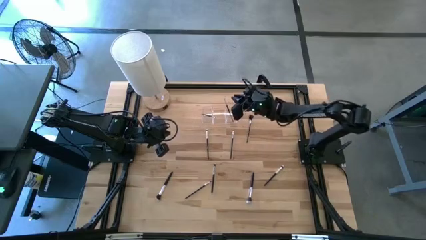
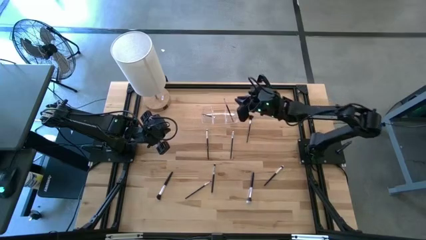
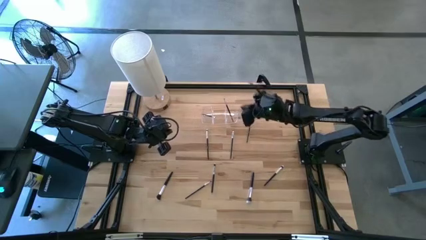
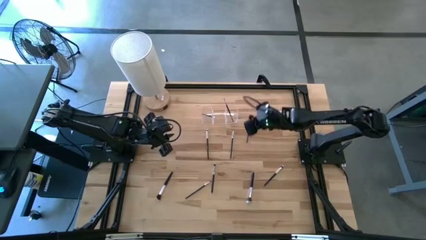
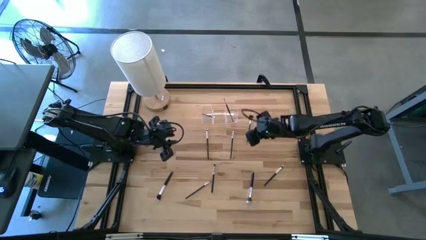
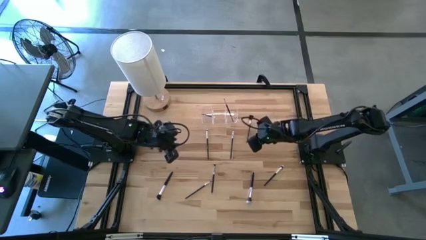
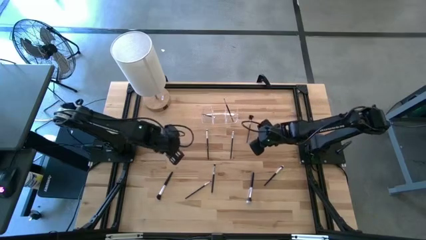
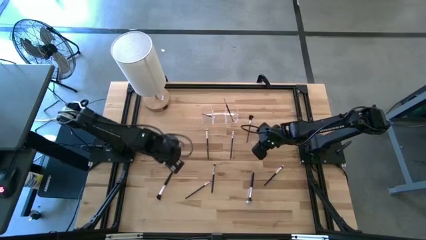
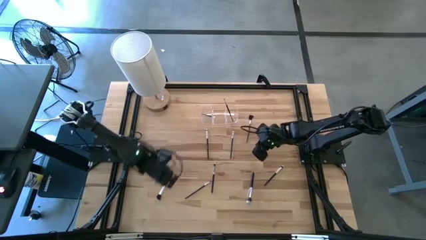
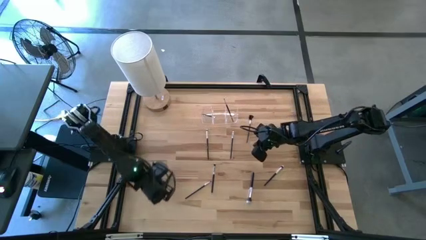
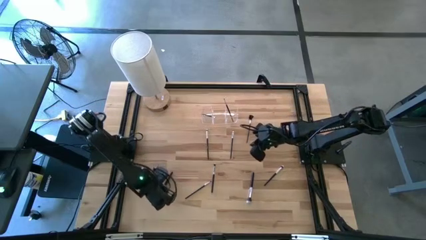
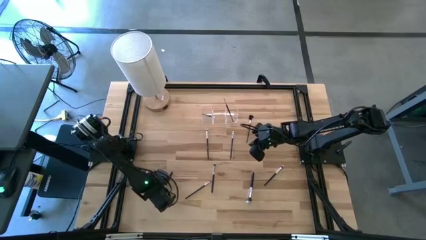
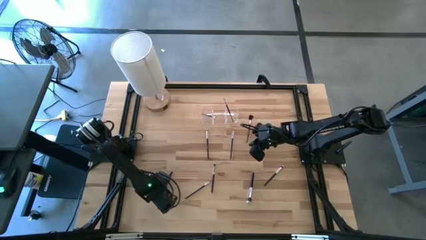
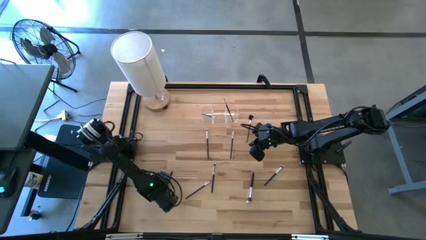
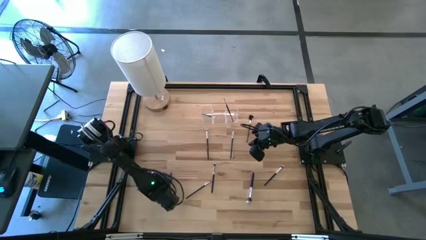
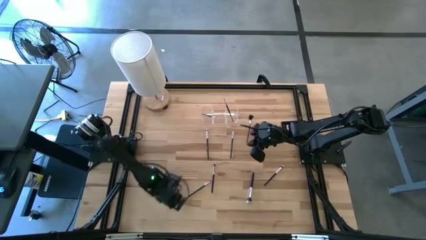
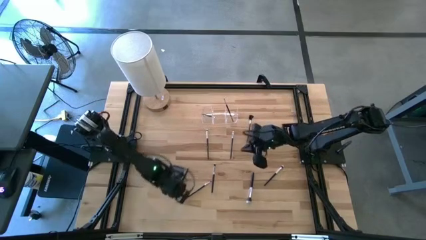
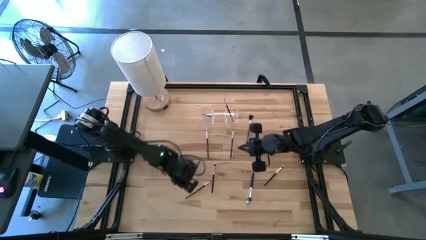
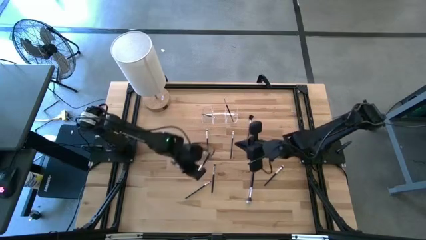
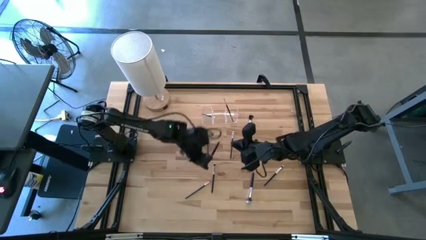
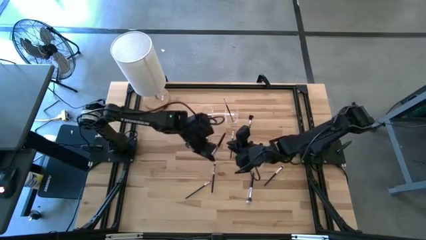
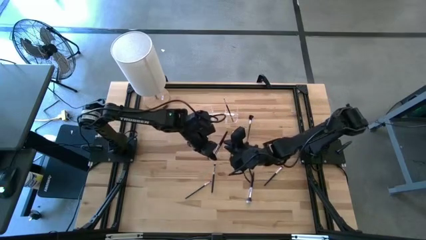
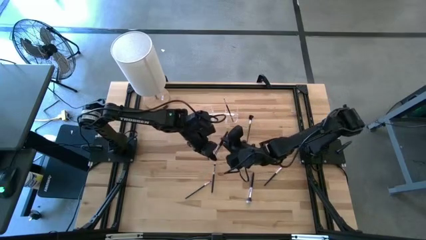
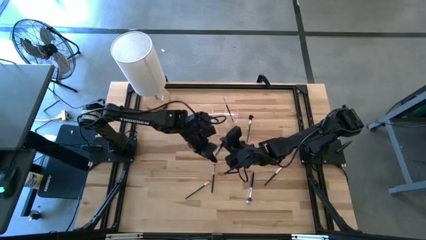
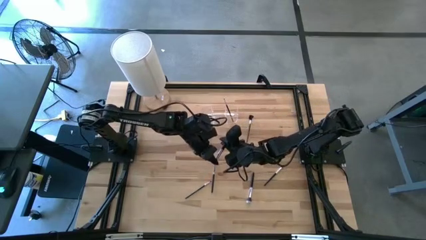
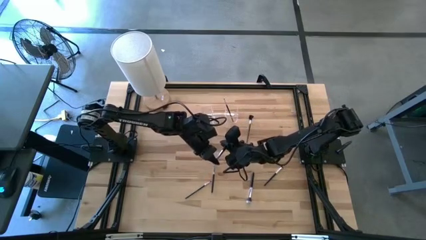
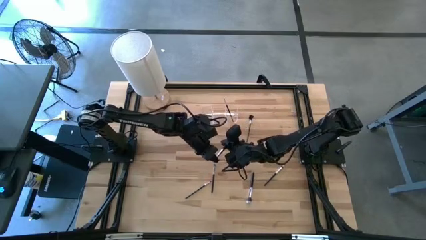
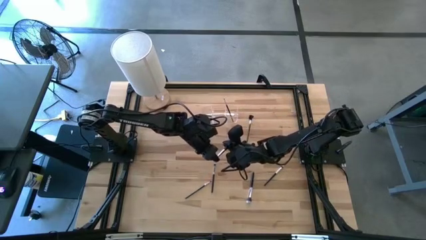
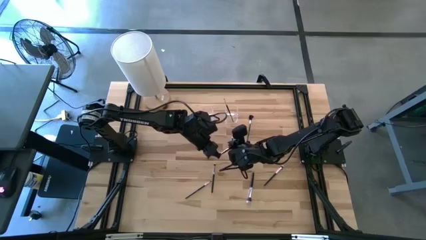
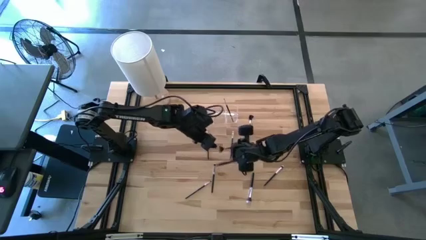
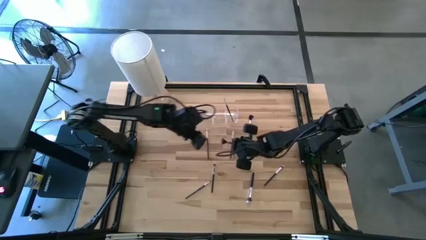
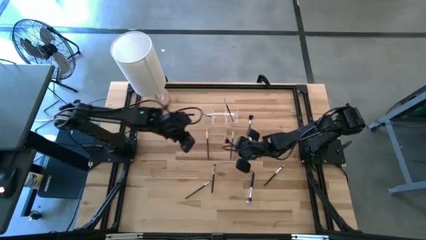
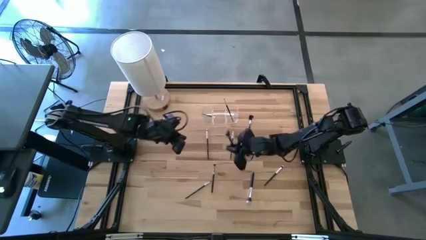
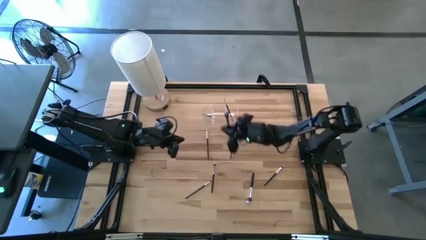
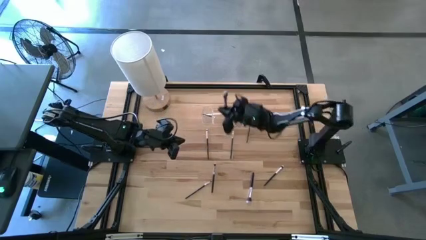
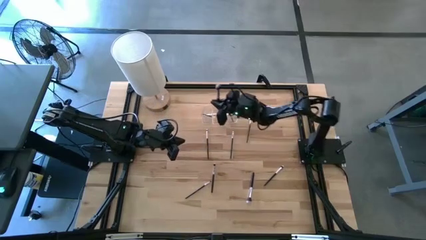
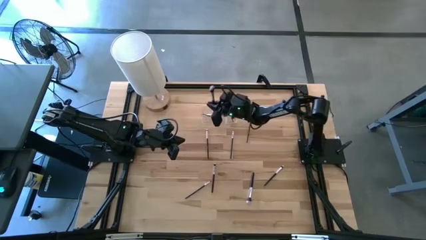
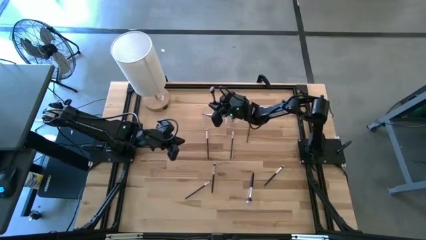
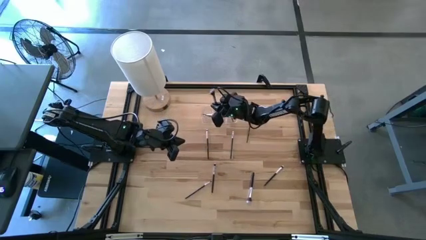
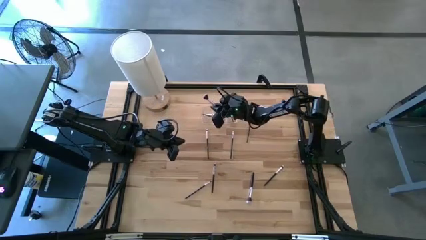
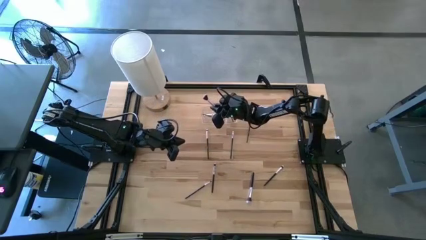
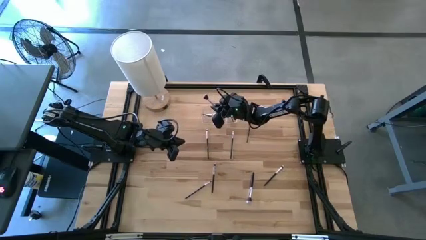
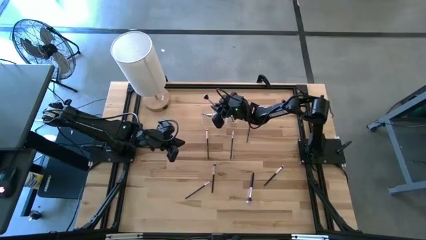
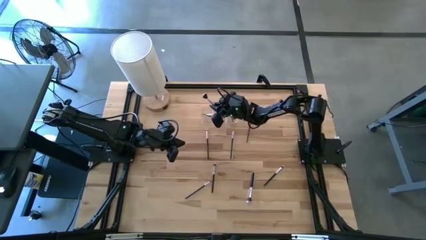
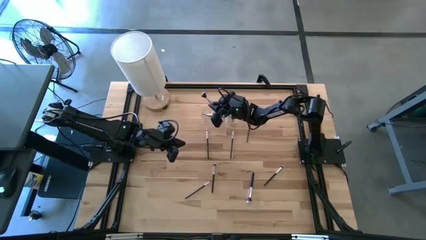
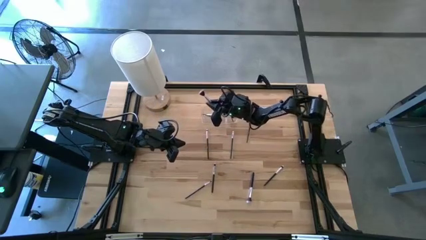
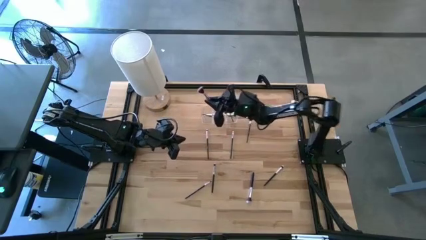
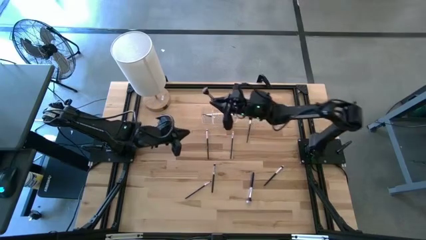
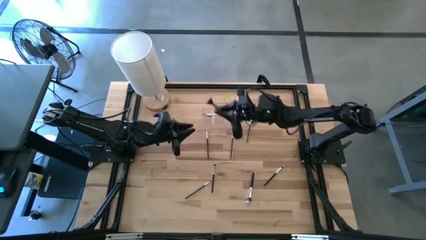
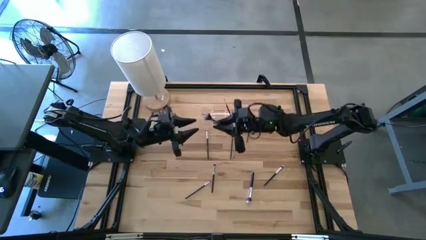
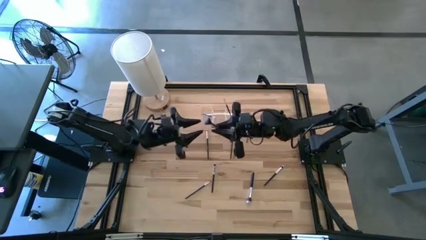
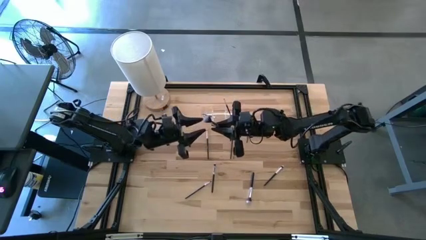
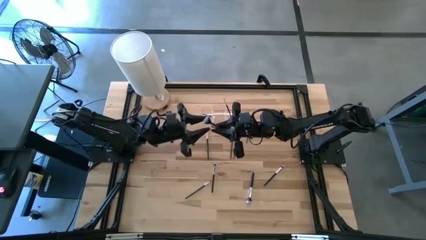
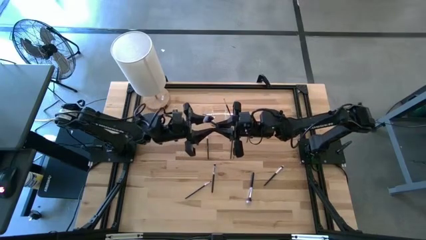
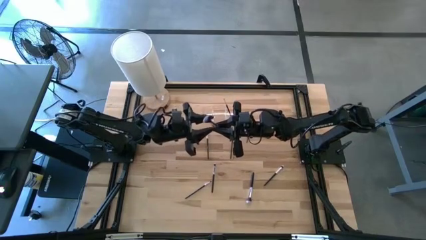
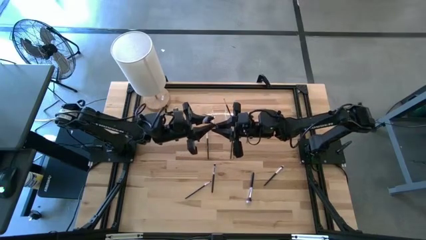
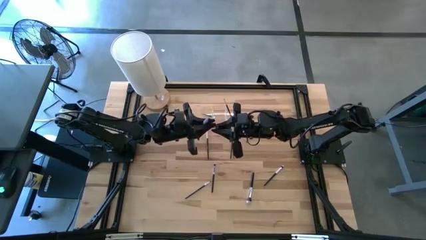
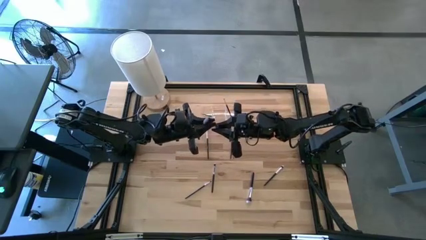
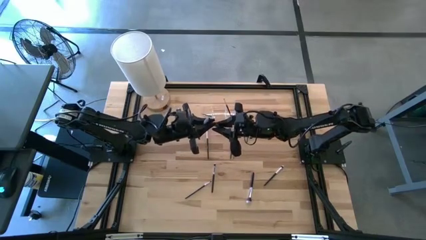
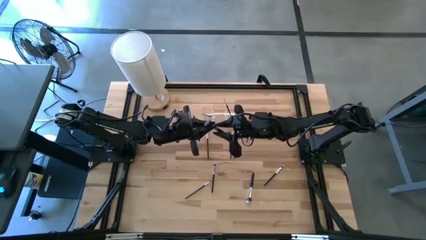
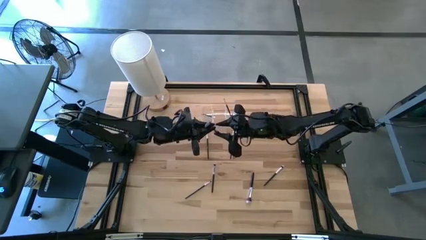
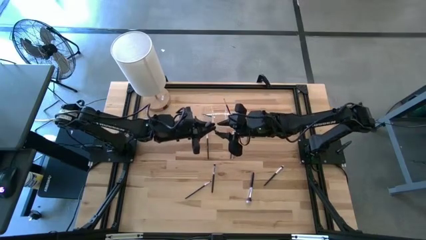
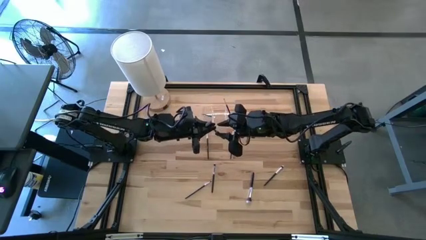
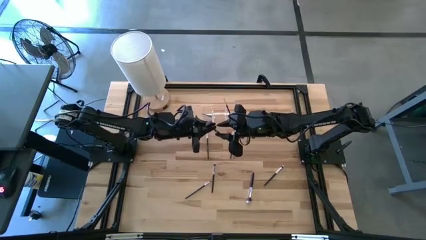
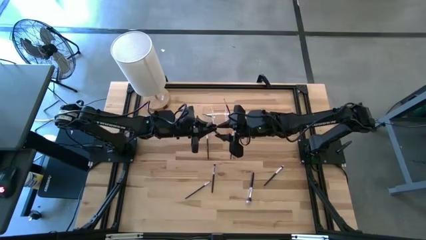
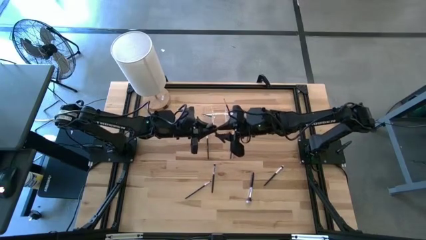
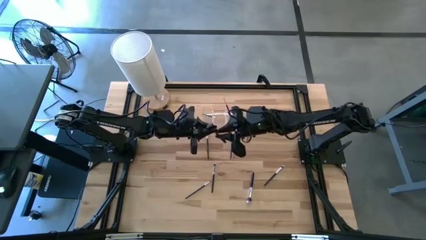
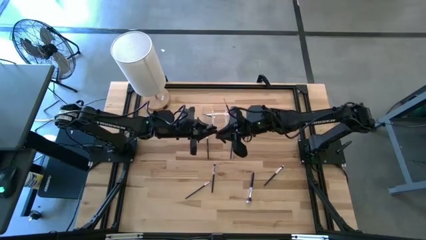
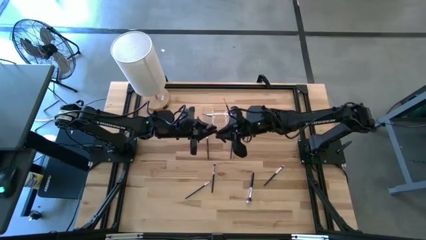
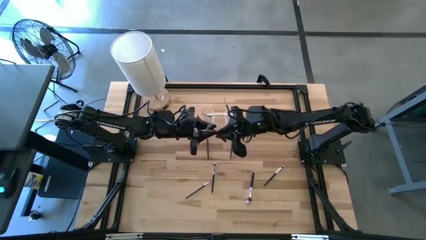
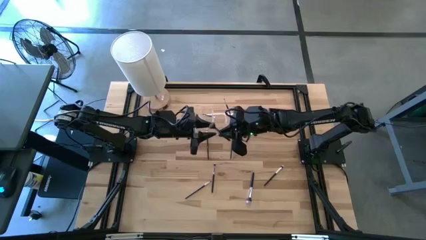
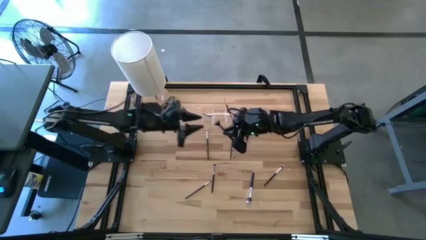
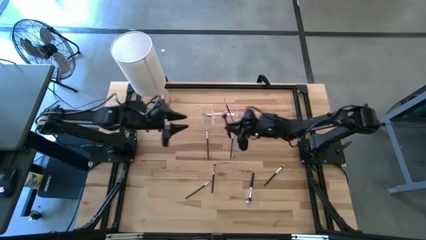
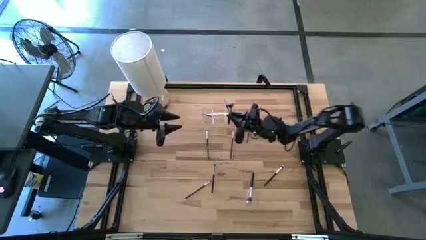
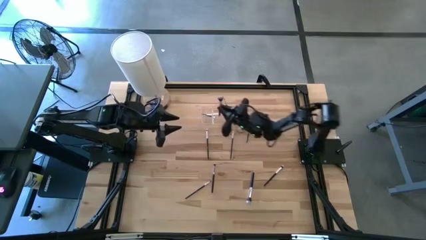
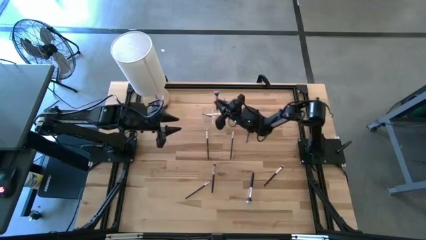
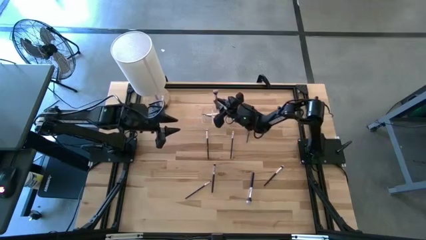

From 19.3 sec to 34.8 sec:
Task: Put items in baskets/containers
Put the black blush brush into the transparent organizer
